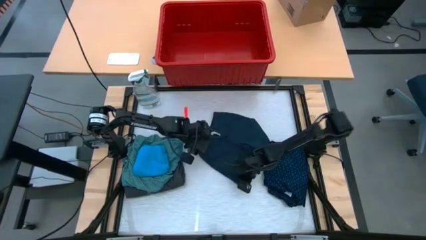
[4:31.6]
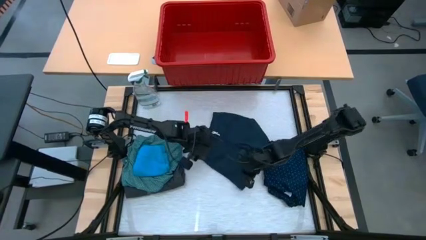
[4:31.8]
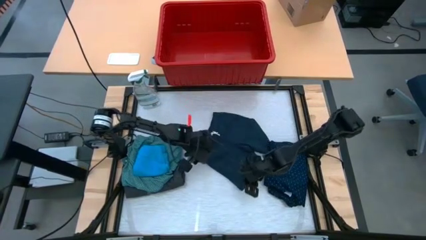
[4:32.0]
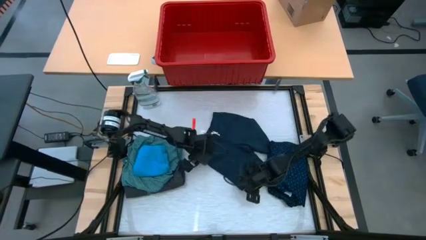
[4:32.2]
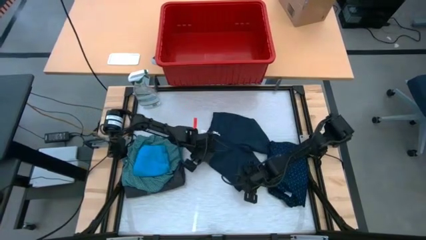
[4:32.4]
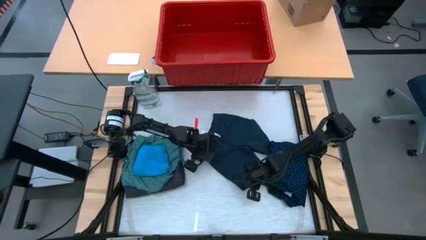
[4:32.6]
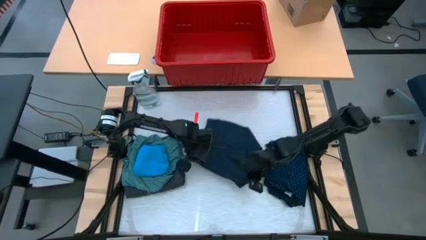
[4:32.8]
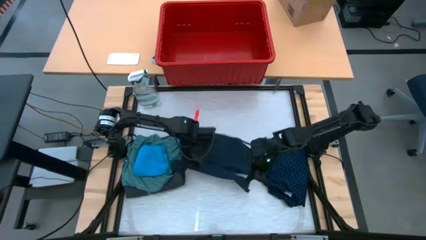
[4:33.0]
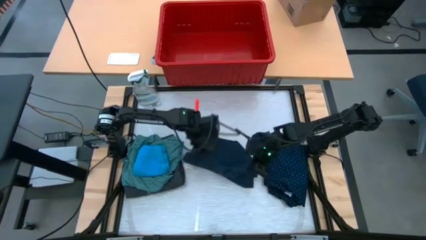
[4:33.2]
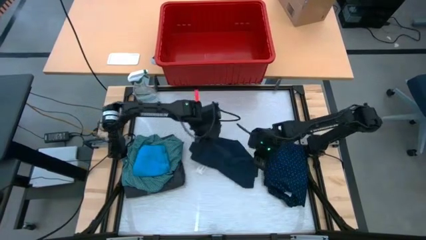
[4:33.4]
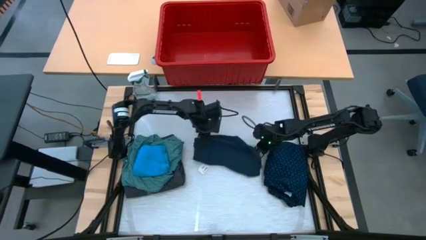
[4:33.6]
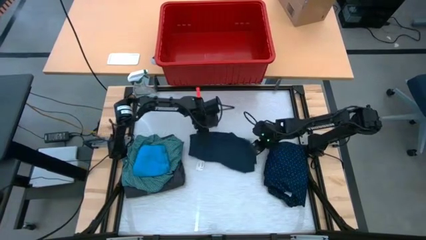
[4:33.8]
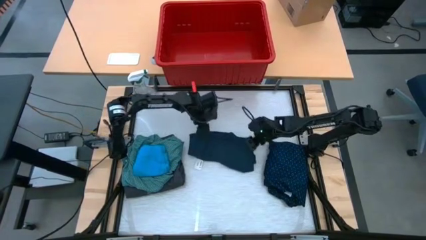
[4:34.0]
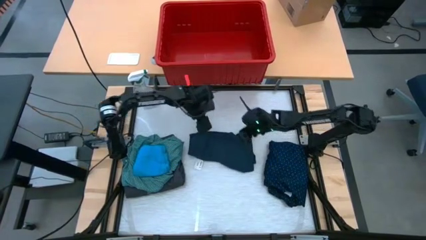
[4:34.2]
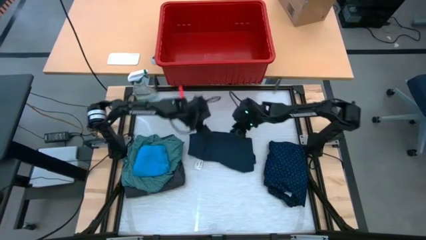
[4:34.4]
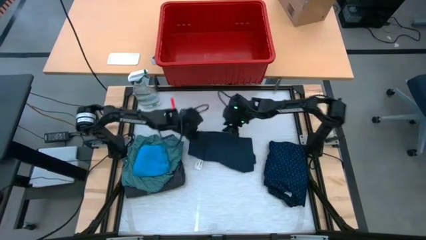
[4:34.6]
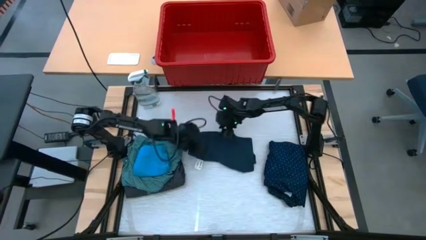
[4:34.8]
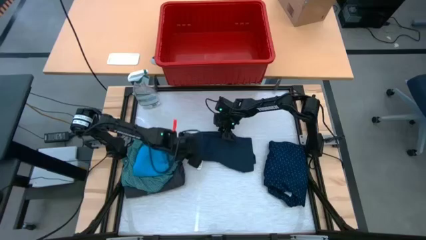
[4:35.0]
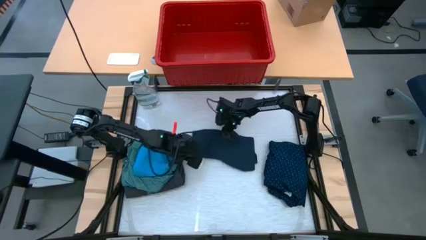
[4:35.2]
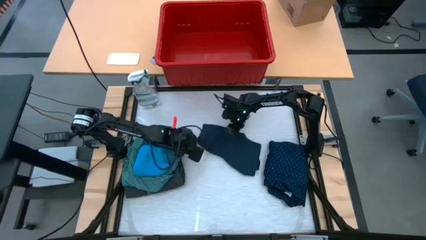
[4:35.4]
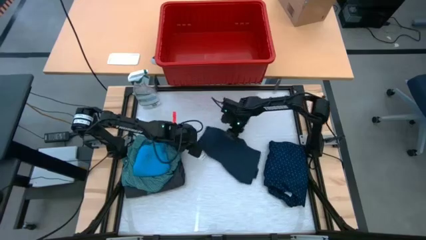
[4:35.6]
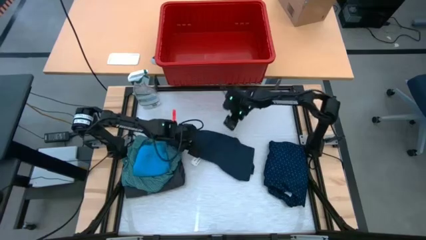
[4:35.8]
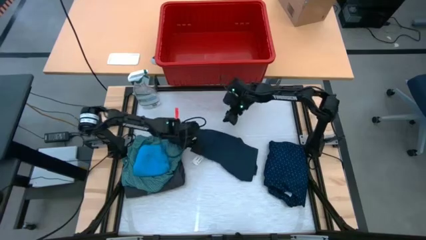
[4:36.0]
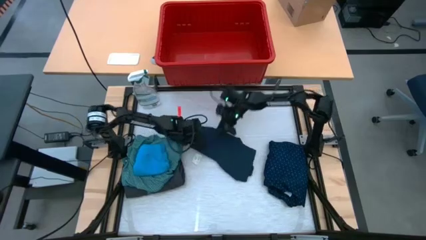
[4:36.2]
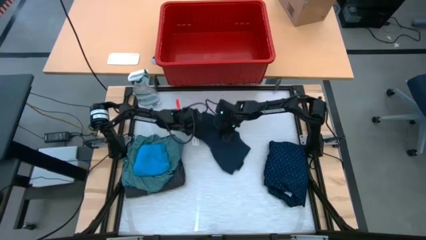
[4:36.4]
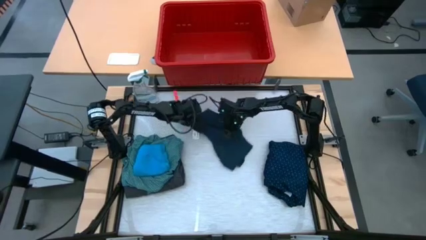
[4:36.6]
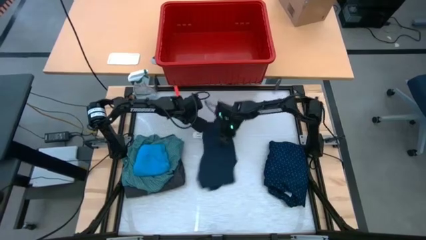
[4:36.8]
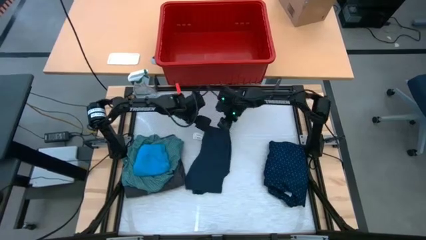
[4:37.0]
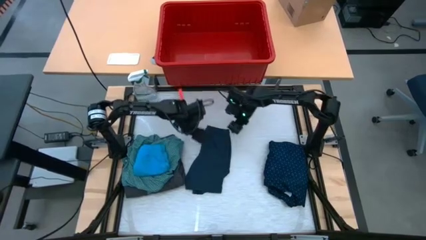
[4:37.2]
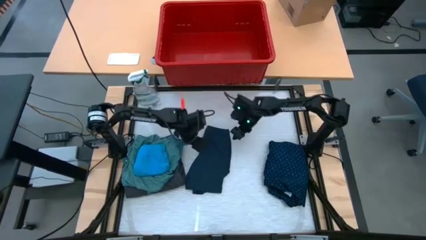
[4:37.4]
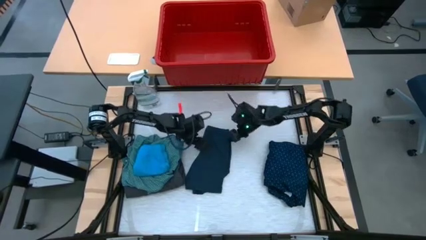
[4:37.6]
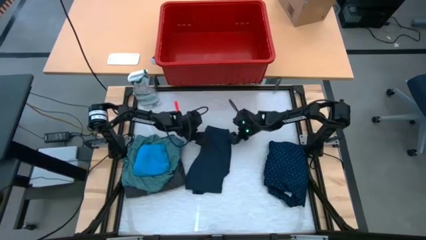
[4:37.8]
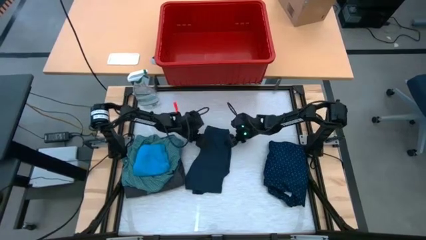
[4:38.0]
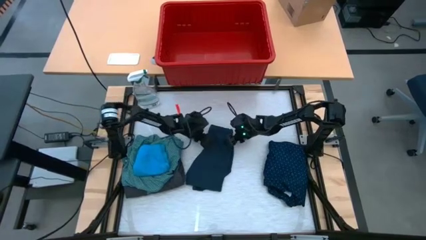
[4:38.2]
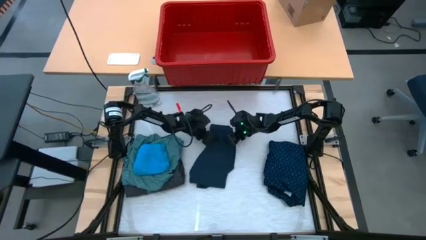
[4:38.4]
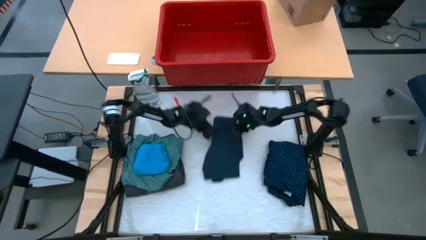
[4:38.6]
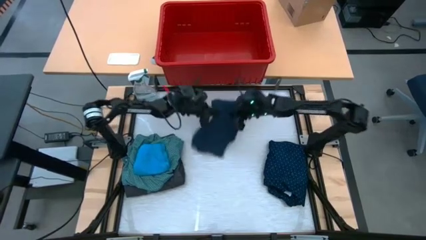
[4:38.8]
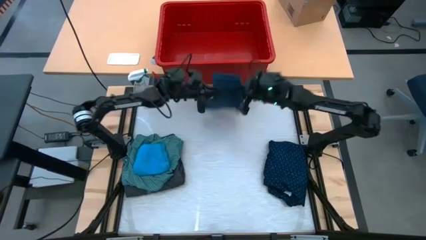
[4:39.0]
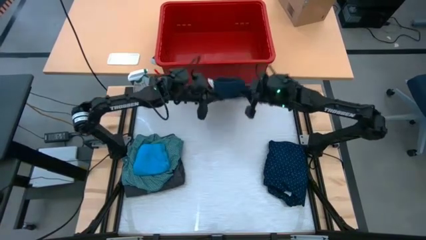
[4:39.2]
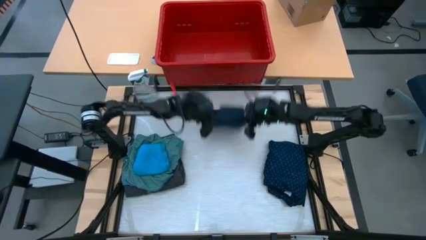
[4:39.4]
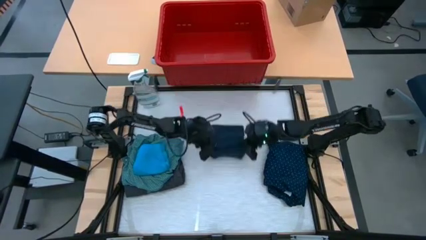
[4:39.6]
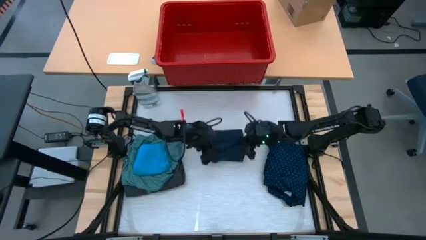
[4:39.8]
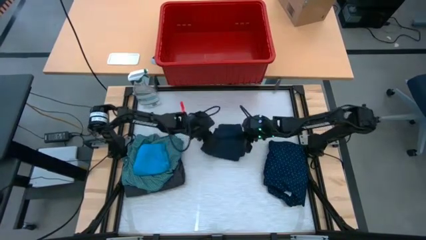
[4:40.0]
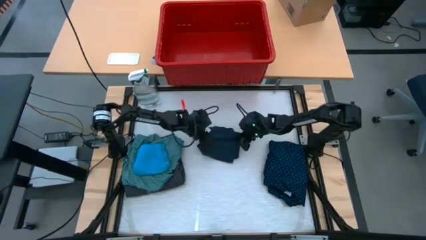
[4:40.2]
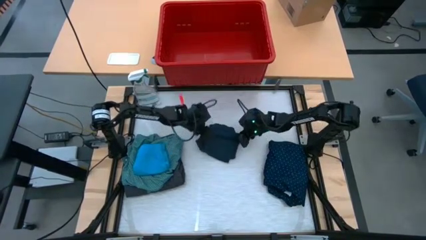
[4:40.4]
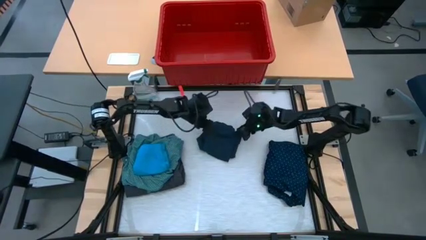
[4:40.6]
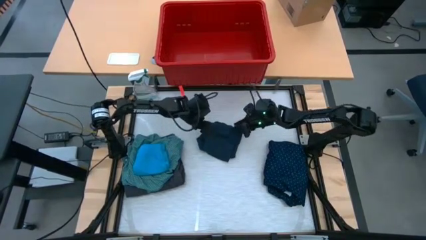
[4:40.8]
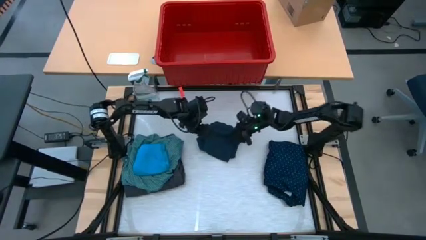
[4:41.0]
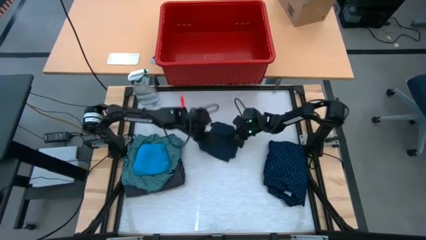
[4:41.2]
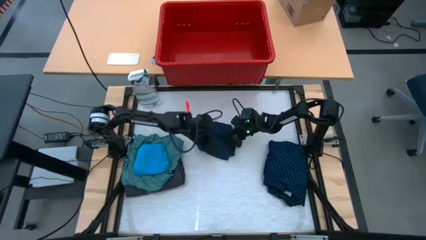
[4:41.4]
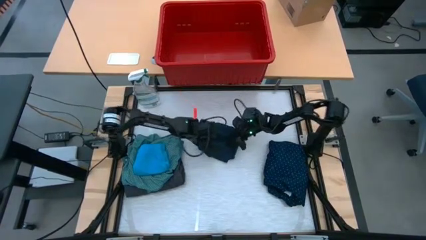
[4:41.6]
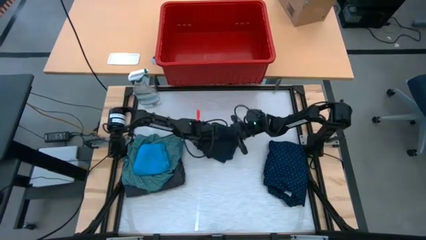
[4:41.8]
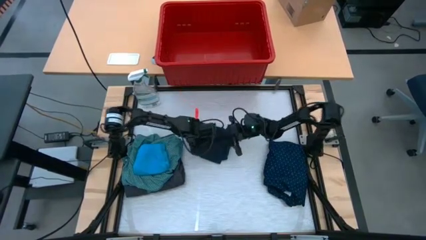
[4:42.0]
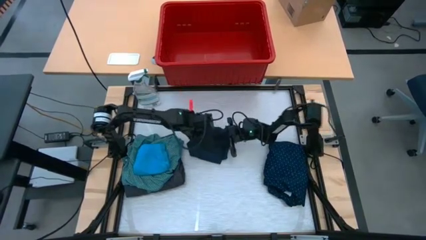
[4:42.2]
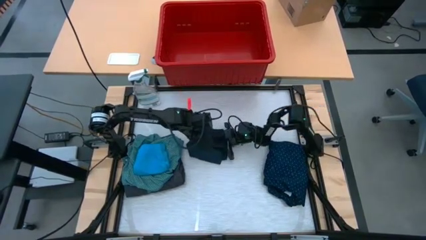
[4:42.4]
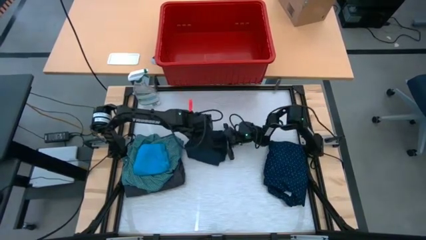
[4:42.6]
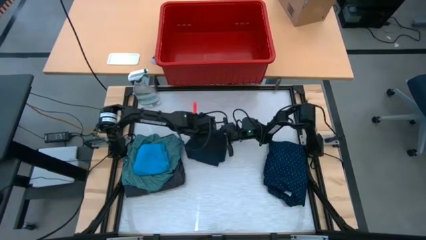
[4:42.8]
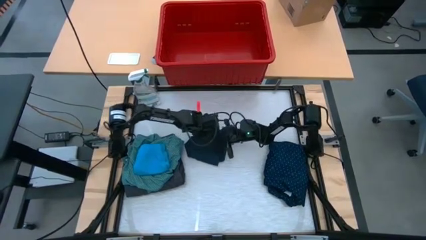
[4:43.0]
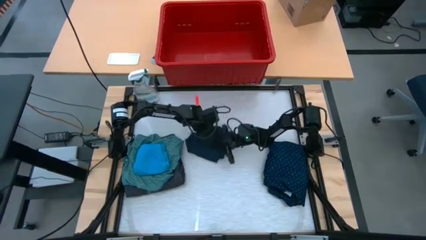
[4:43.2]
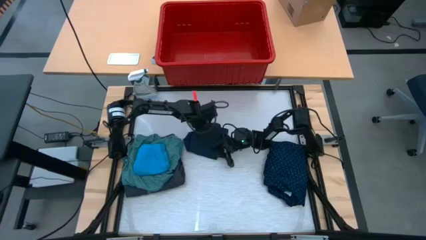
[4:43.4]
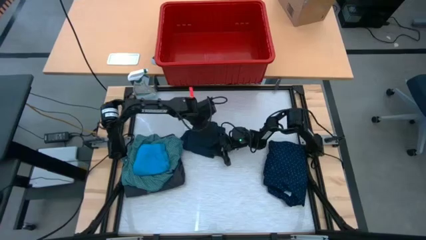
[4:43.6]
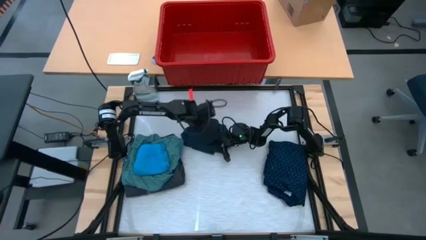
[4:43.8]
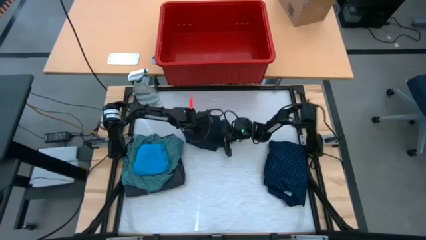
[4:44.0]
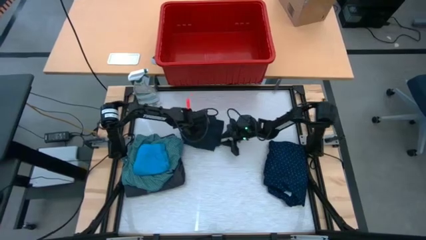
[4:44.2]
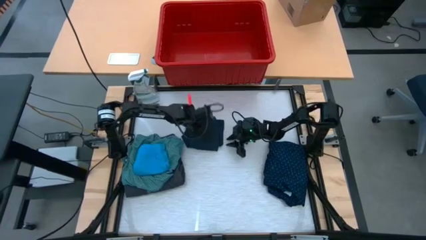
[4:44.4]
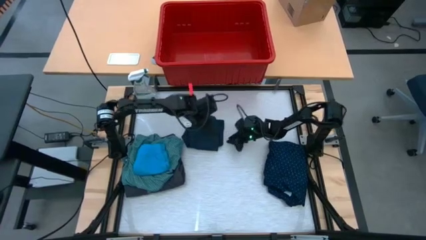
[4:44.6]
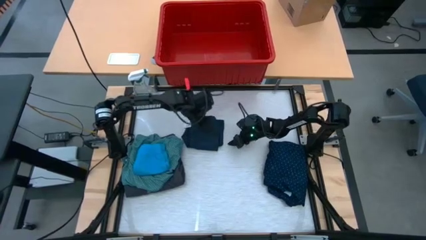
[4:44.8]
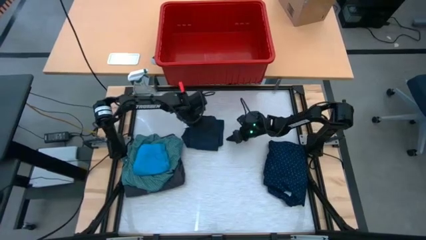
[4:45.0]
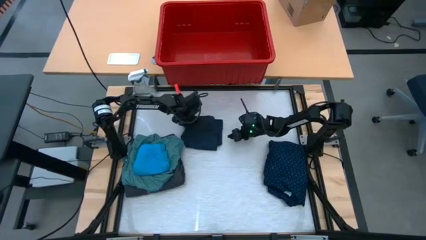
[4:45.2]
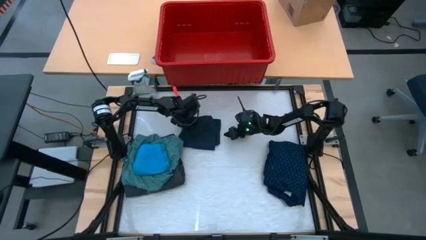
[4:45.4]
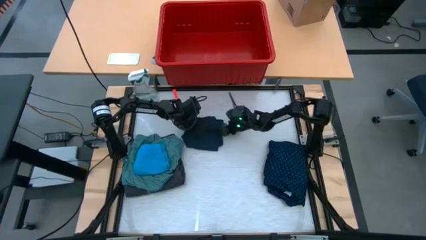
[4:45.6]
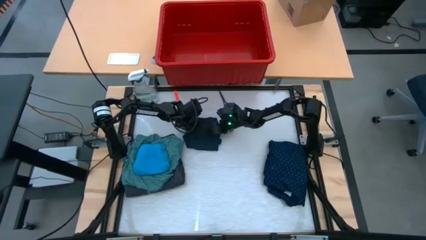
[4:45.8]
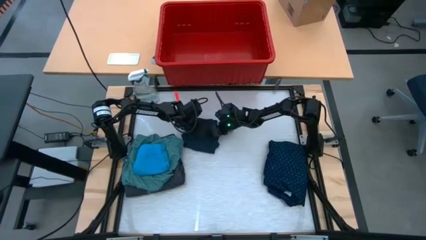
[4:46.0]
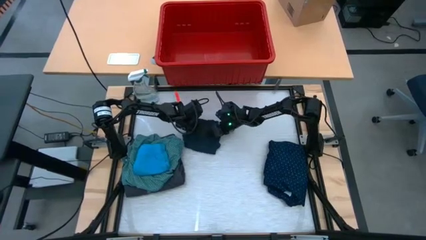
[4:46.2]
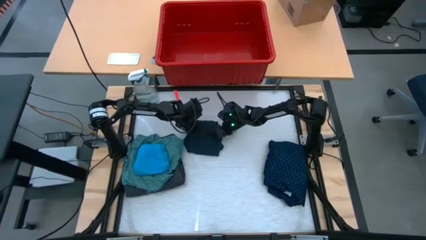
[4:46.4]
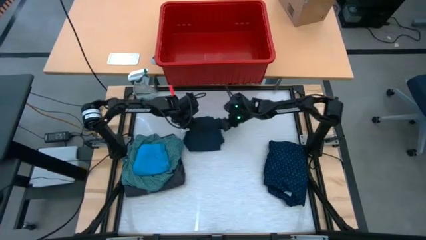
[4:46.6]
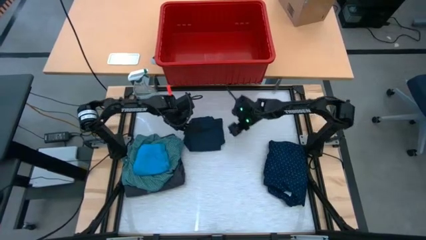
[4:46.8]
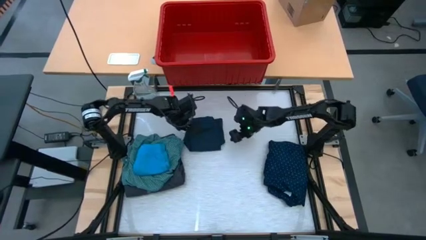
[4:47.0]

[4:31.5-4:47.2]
Task: Fold laundry
Fold the dark blue shorts

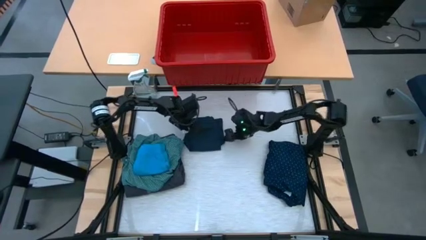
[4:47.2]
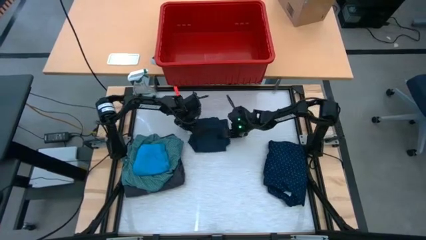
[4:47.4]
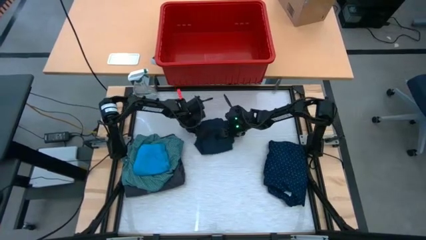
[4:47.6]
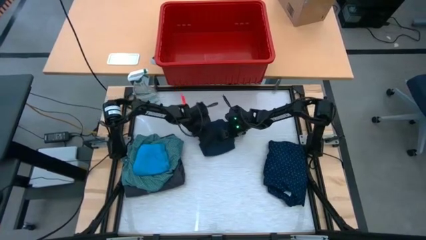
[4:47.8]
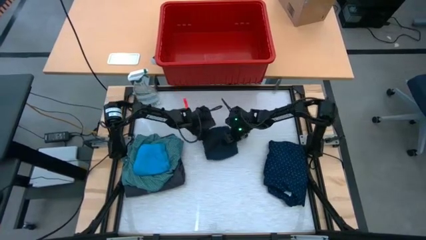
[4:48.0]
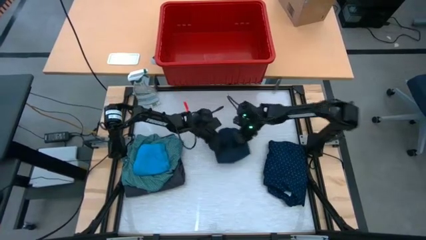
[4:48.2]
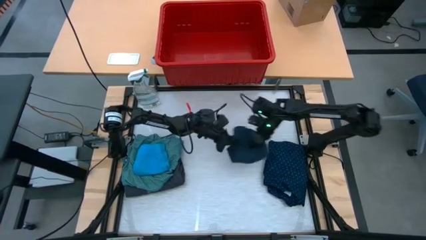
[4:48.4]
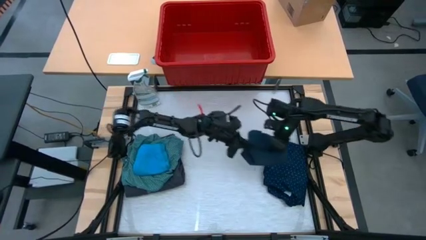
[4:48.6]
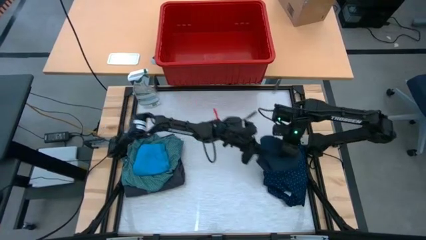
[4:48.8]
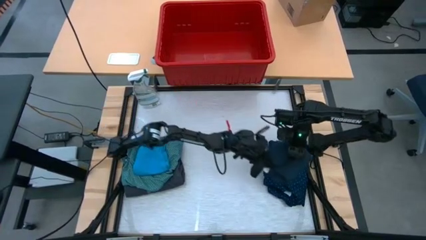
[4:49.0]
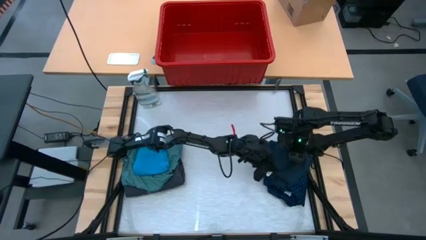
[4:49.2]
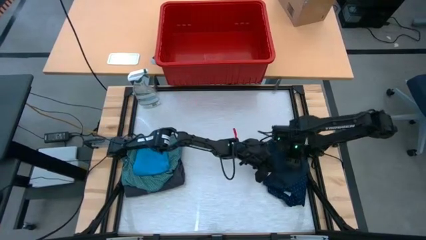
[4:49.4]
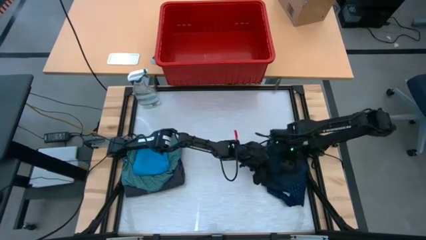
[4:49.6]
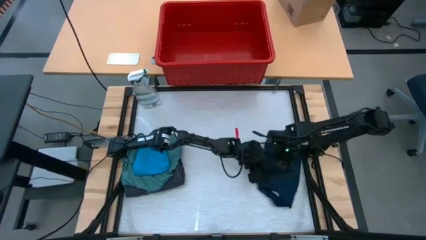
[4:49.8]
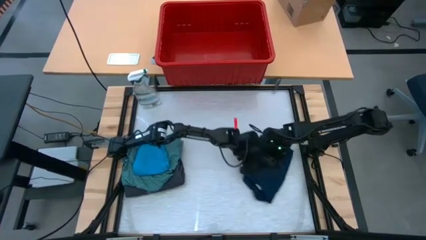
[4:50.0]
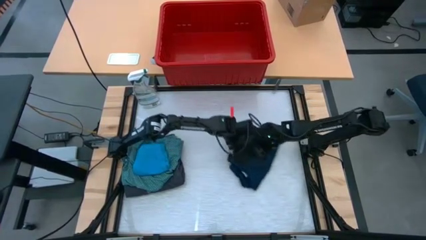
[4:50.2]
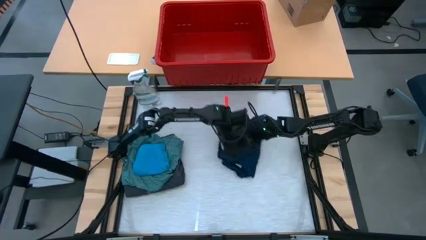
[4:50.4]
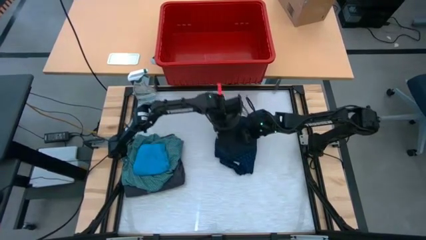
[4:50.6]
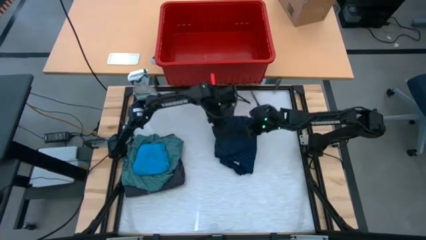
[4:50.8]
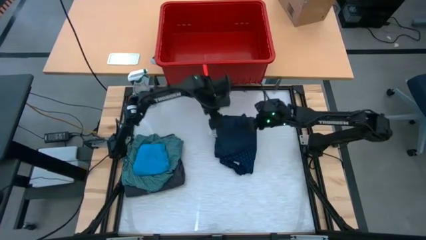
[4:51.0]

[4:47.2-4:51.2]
Stack the dark blue shorts on top of the blue shirt
